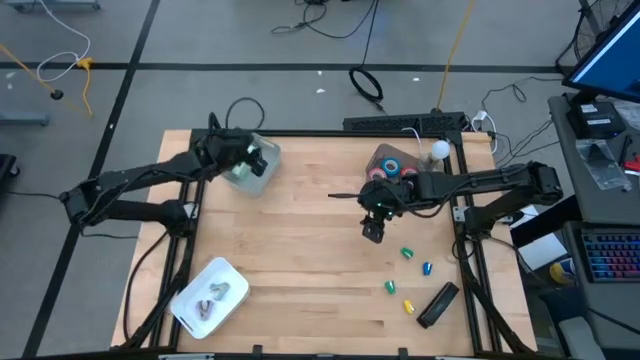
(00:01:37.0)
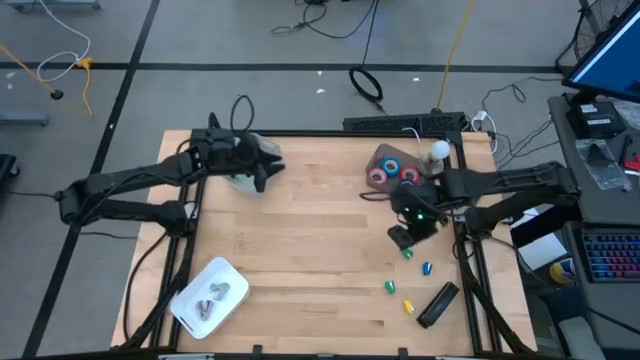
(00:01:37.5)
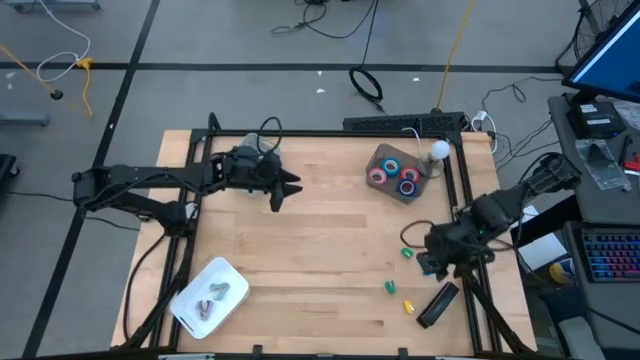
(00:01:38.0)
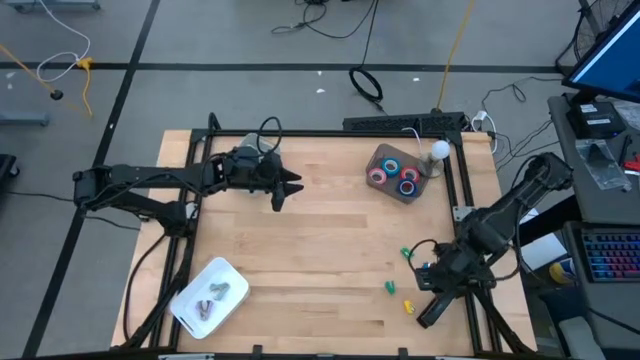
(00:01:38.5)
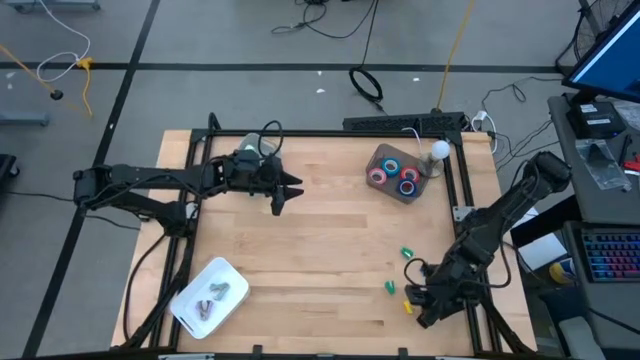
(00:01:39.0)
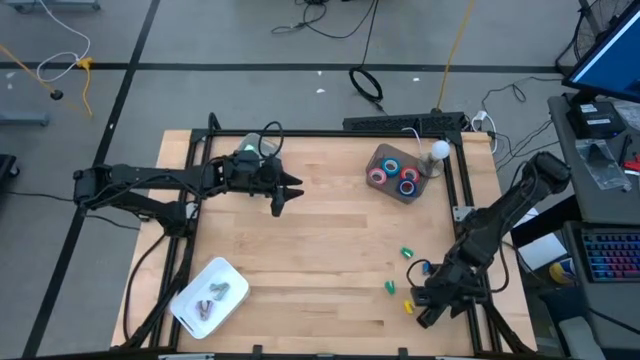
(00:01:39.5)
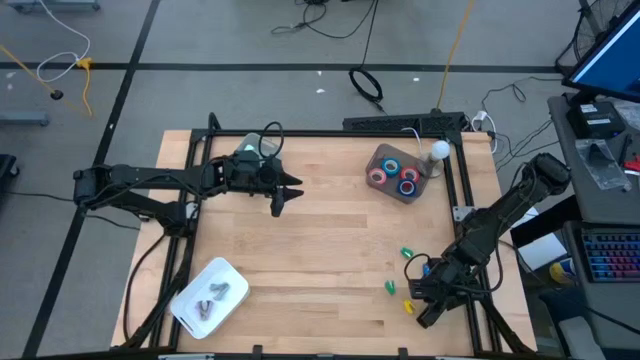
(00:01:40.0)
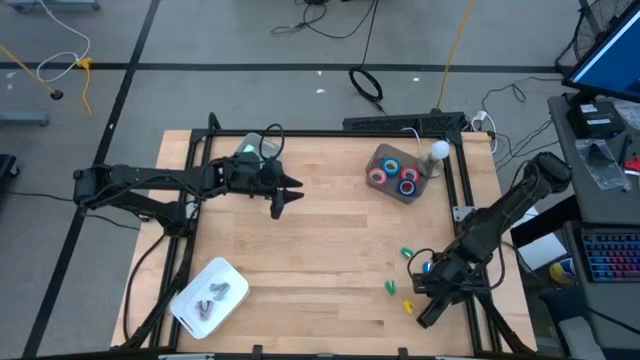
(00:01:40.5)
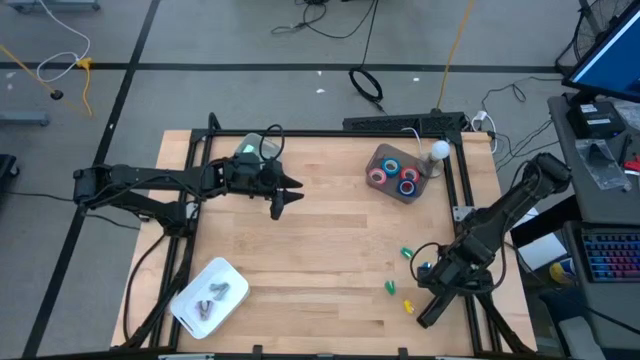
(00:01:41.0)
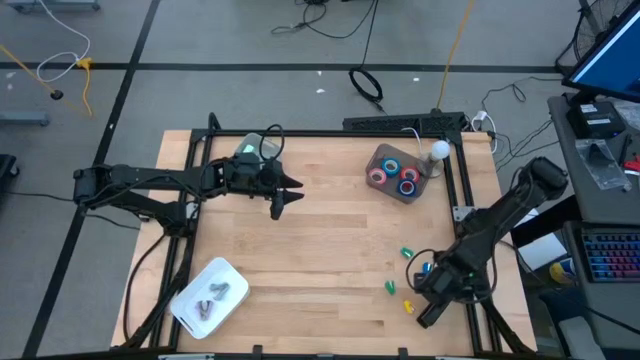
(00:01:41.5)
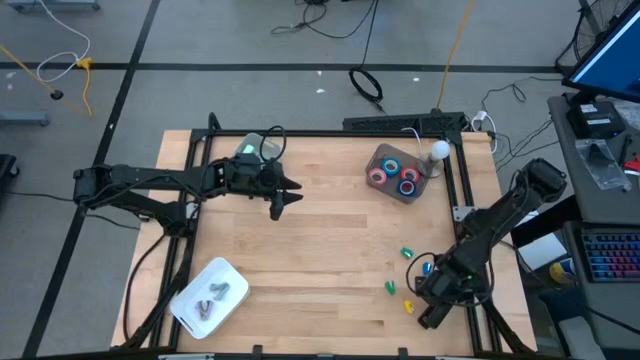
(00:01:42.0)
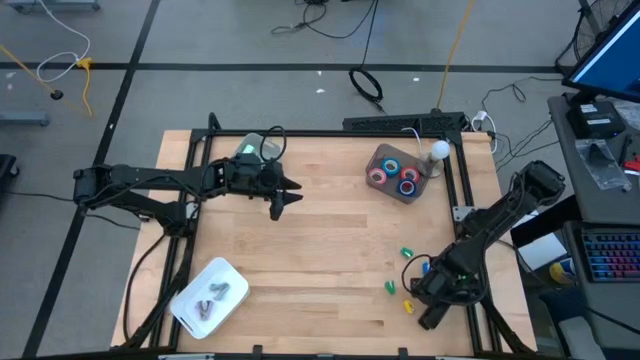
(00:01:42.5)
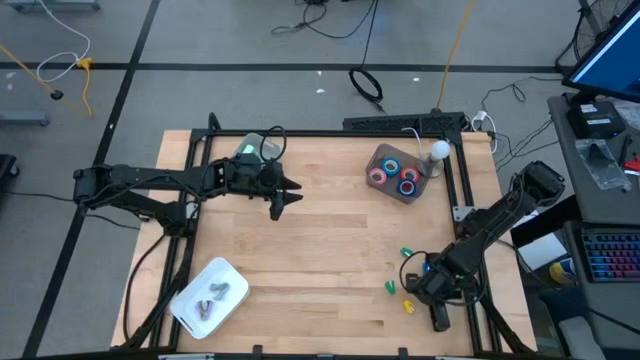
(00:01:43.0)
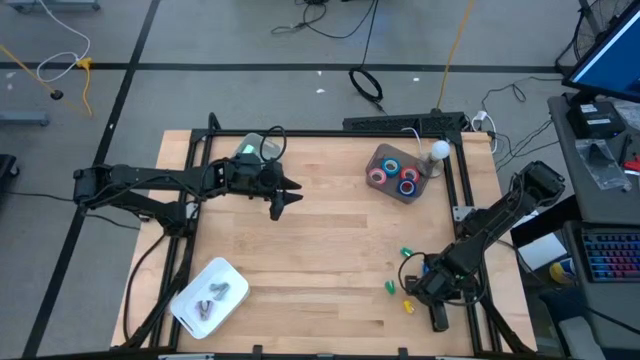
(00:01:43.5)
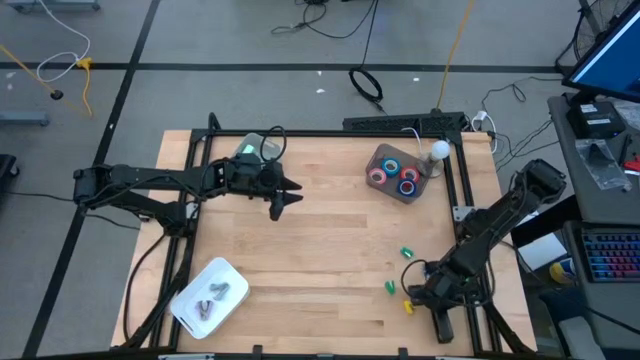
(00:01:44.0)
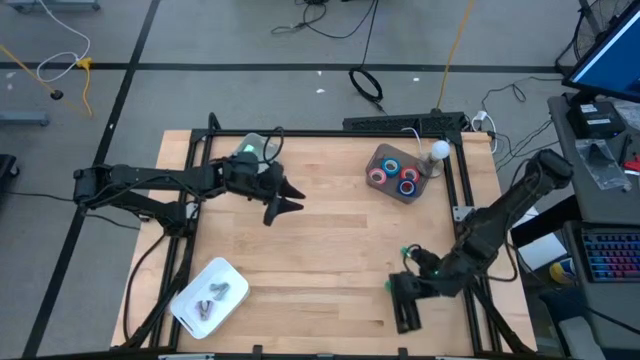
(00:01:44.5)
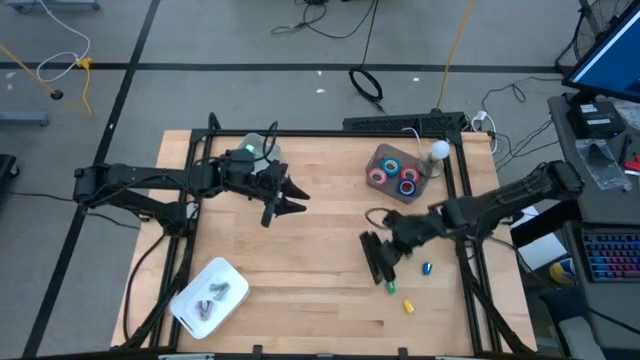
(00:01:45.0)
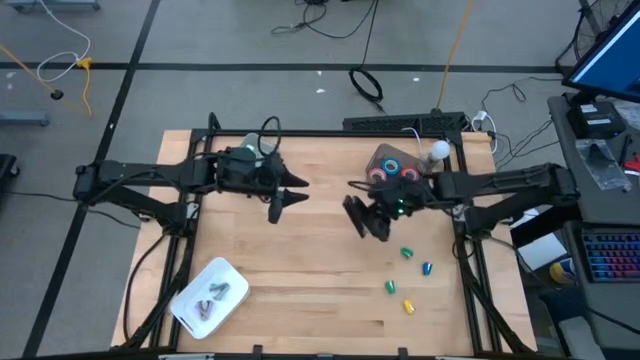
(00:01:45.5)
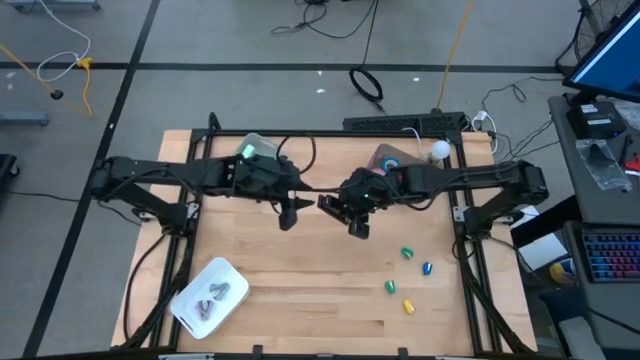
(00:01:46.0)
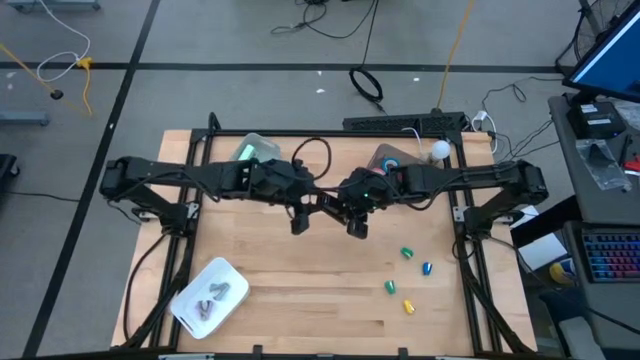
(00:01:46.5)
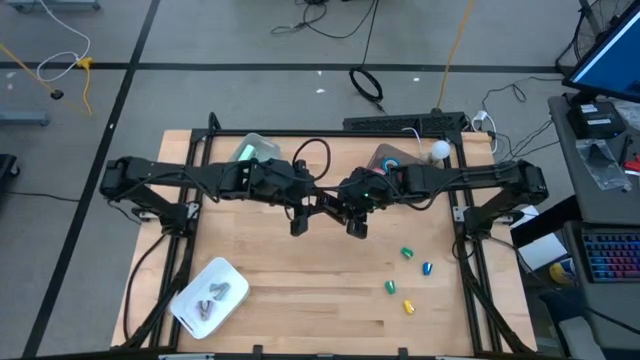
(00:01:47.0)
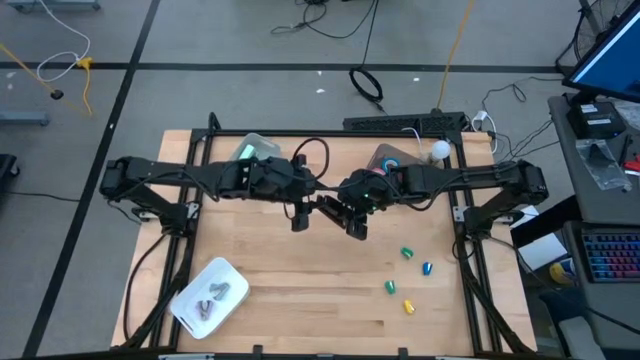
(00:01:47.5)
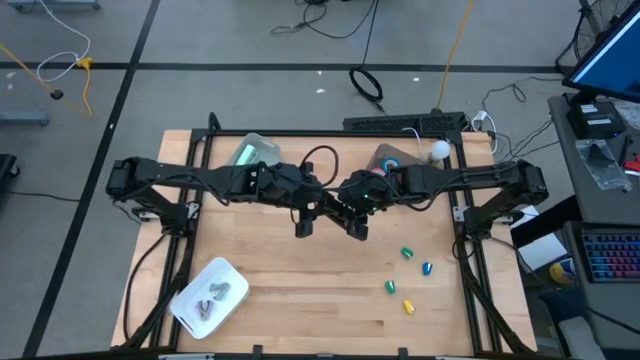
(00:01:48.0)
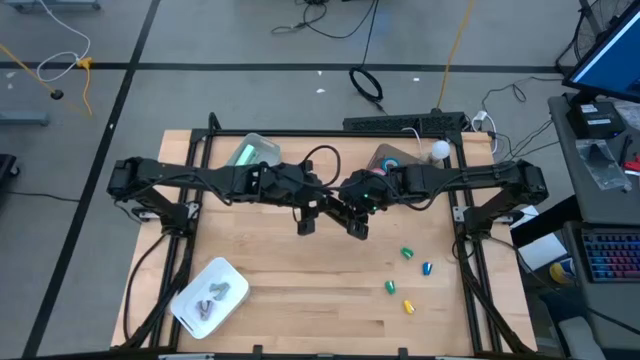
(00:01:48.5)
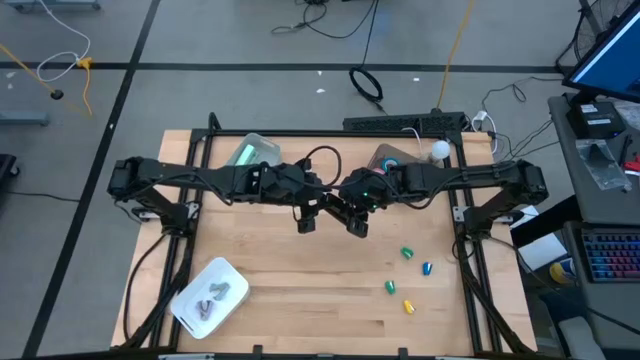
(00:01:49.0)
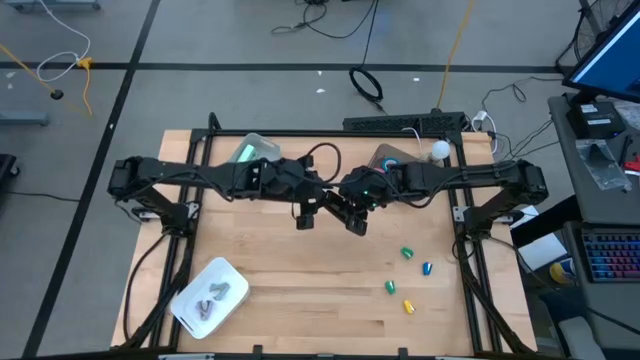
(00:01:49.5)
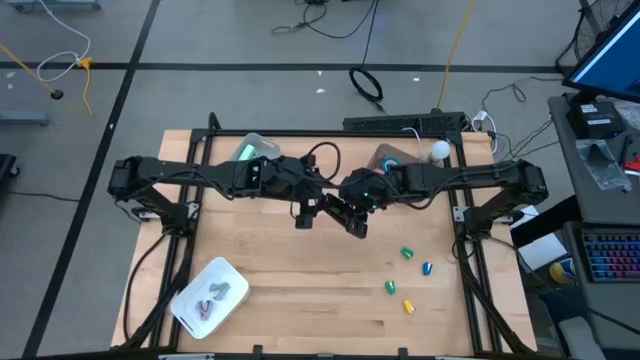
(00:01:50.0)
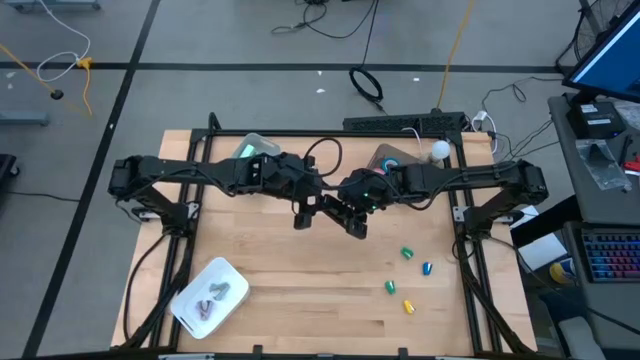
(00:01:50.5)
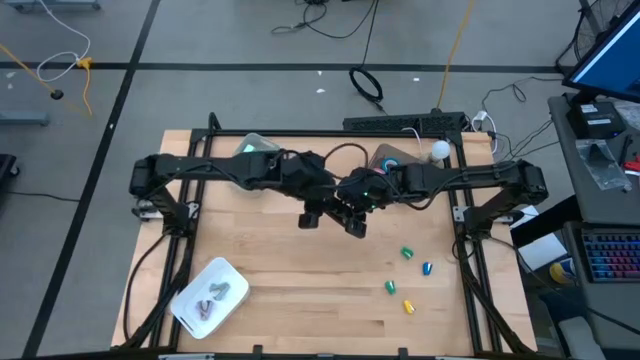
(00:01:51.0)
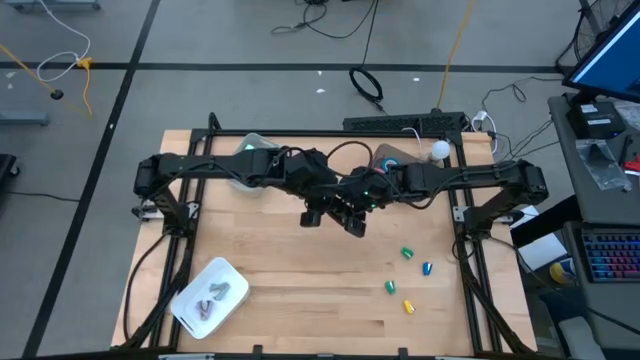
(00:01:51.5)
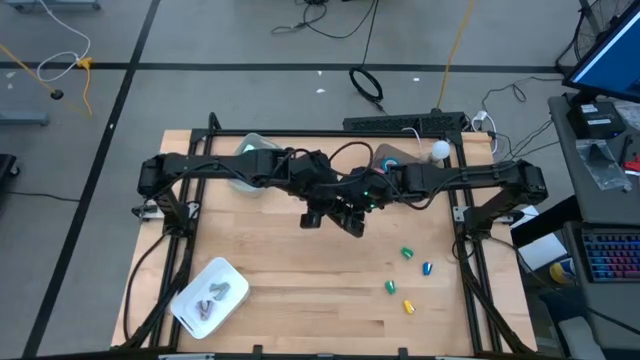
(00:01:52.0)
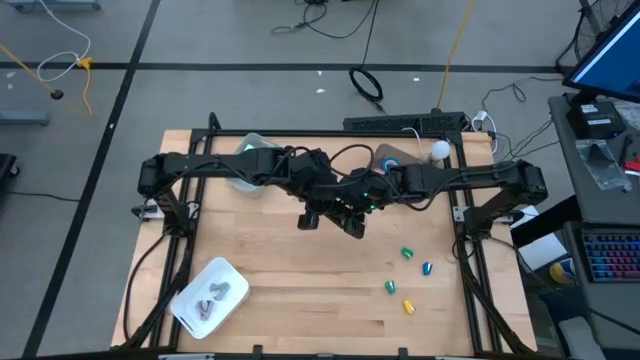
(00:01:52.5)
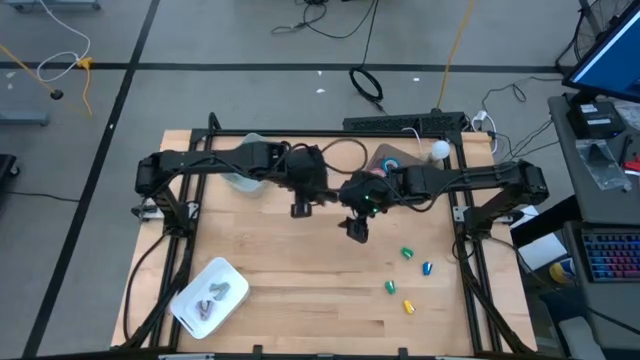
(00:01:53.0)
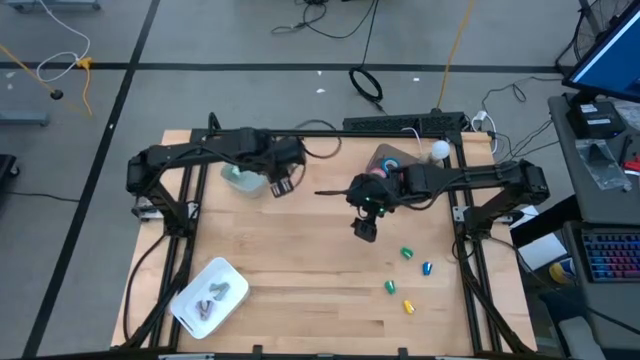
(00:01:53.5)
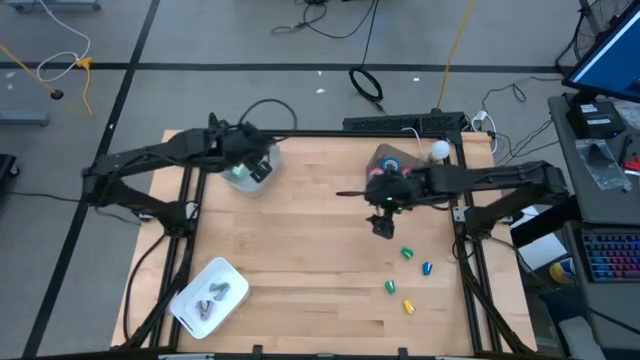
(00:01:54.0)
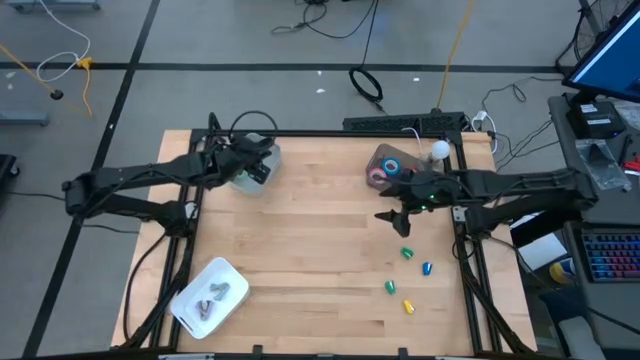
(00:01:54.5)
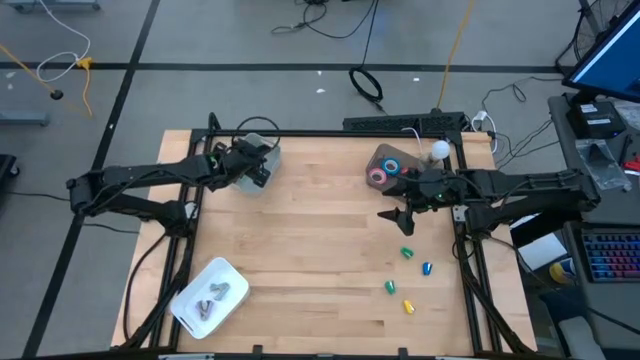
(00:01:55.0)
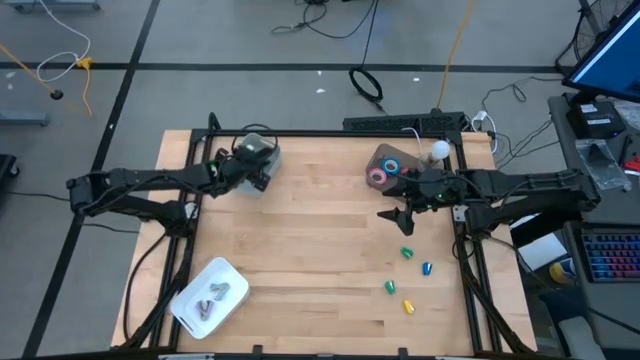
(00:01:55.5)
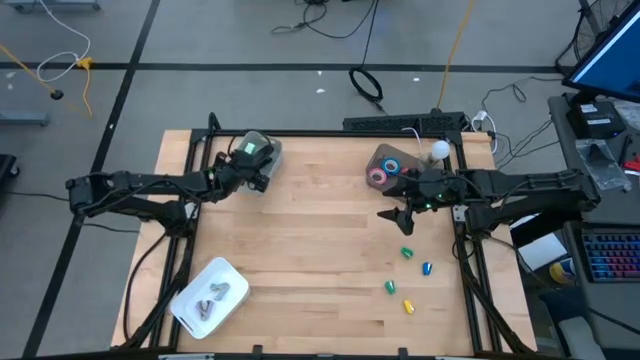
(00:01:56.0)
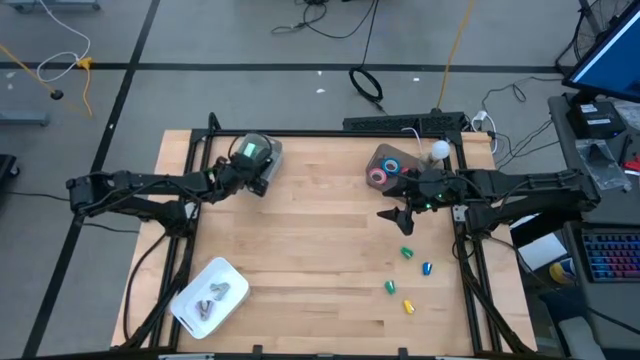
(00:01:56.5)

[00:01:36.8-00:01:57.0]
Task: Pick and place Stapler, Stapler remover, tape
Put the large black stapler into the gray bin
